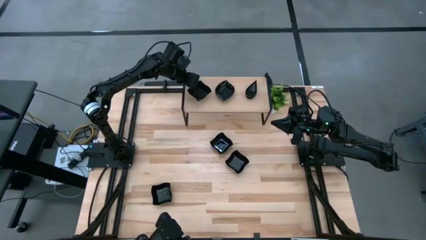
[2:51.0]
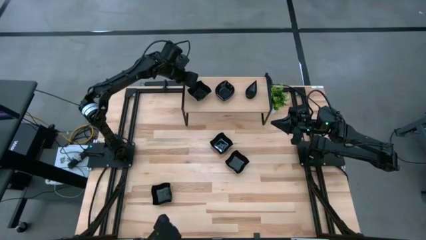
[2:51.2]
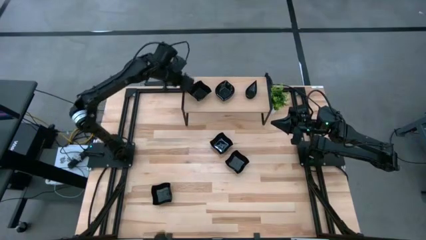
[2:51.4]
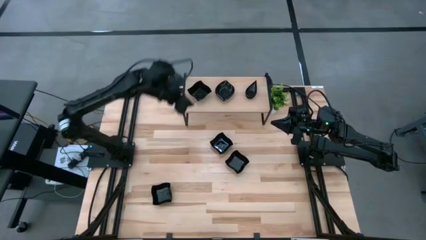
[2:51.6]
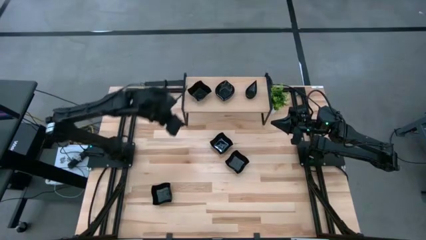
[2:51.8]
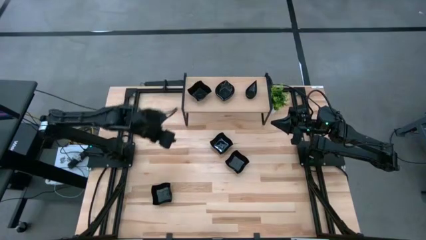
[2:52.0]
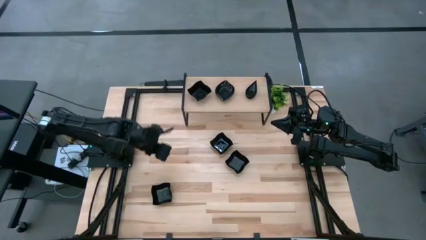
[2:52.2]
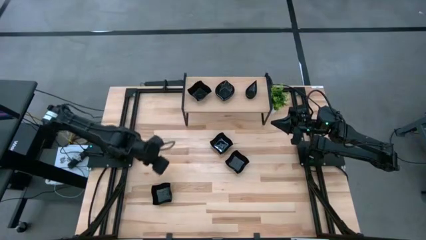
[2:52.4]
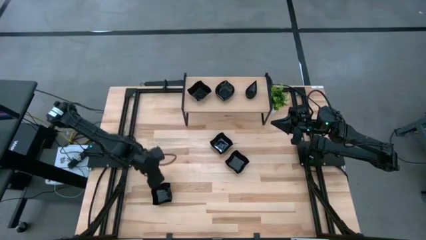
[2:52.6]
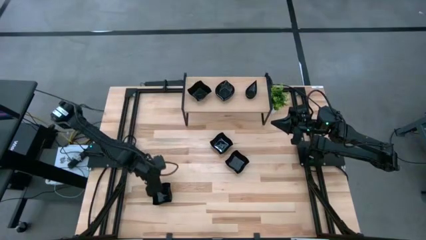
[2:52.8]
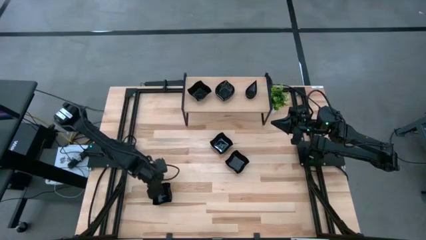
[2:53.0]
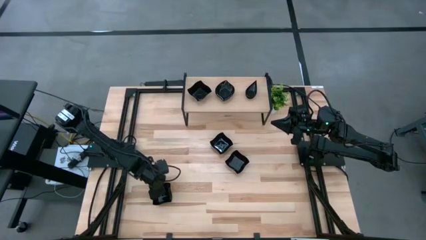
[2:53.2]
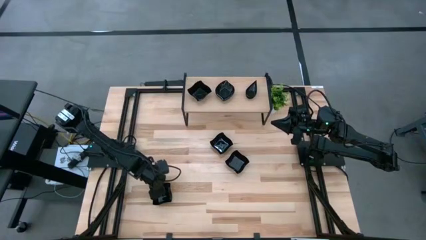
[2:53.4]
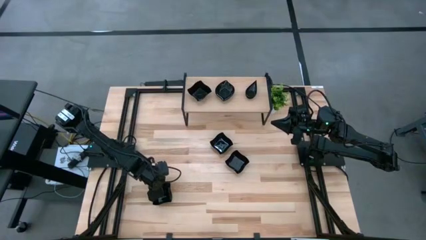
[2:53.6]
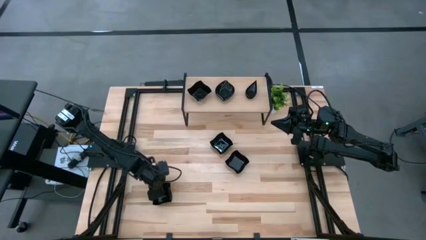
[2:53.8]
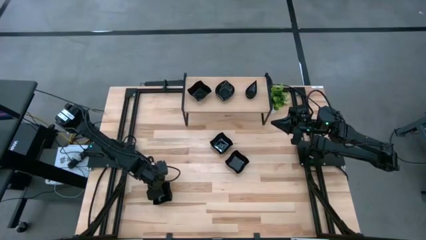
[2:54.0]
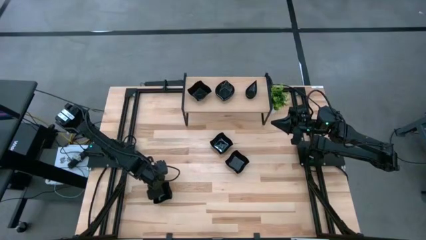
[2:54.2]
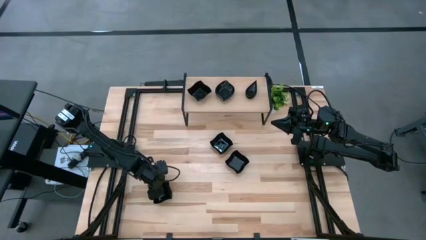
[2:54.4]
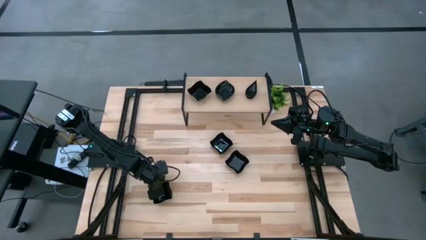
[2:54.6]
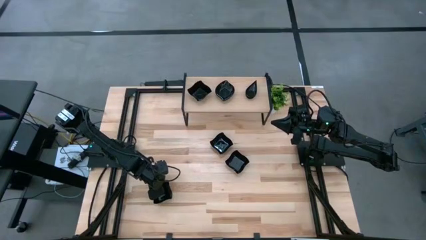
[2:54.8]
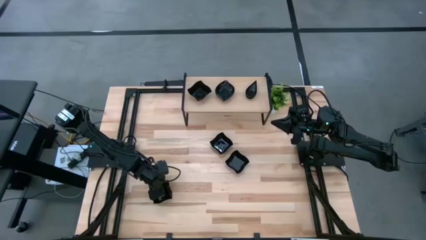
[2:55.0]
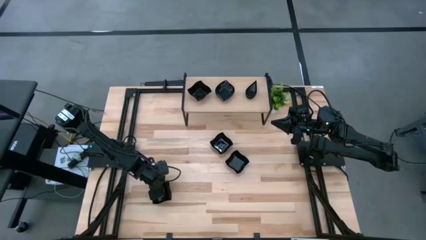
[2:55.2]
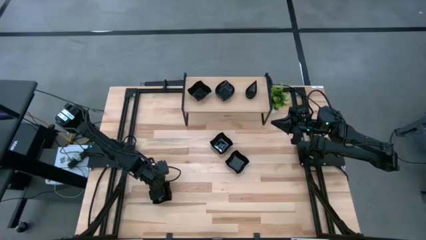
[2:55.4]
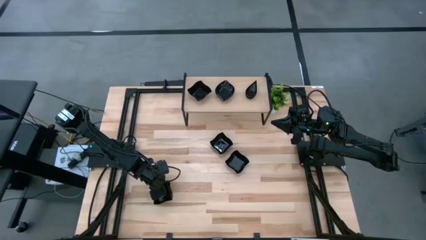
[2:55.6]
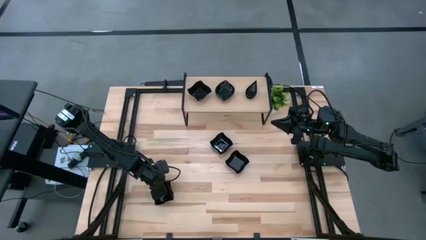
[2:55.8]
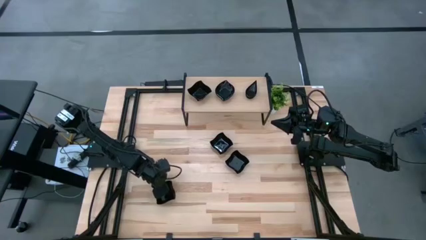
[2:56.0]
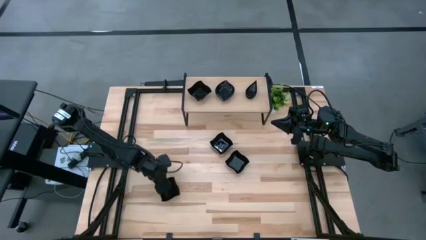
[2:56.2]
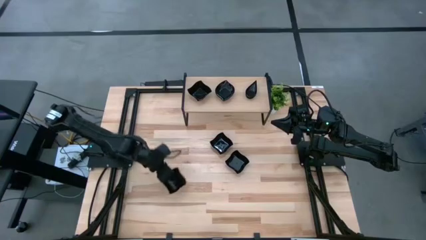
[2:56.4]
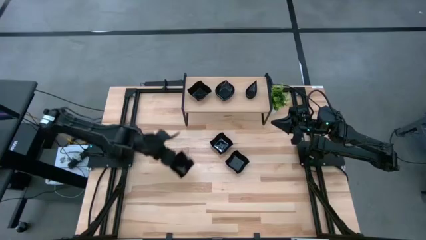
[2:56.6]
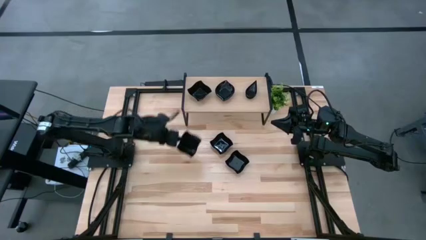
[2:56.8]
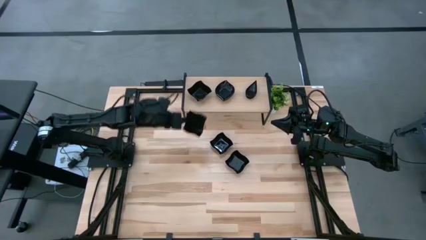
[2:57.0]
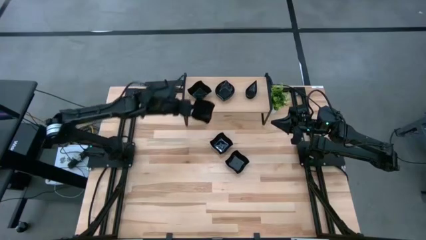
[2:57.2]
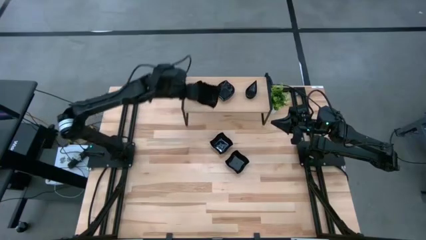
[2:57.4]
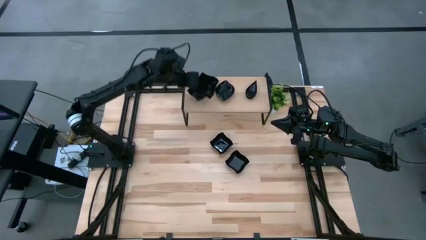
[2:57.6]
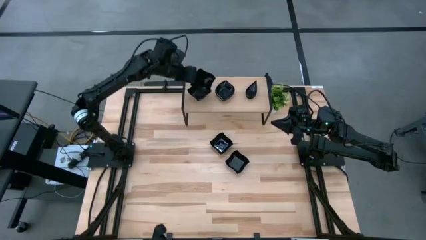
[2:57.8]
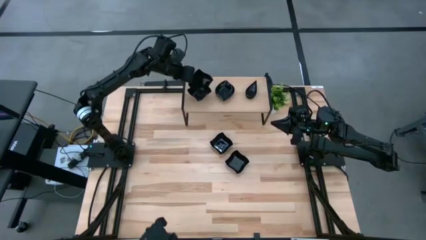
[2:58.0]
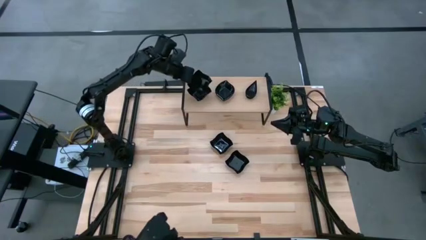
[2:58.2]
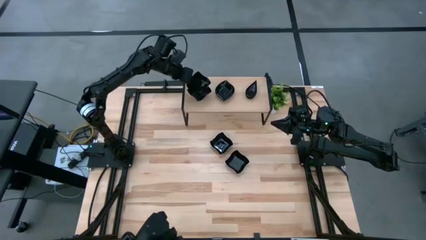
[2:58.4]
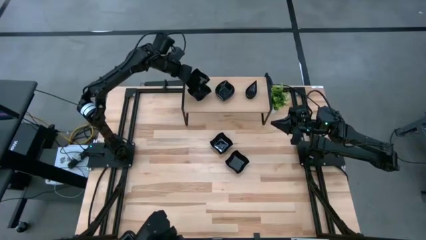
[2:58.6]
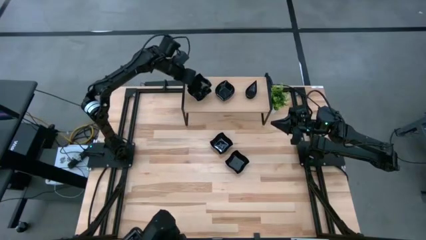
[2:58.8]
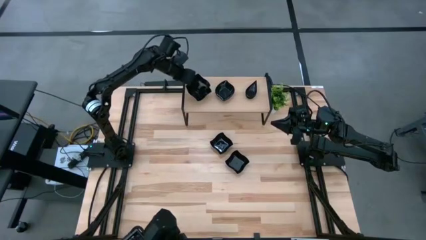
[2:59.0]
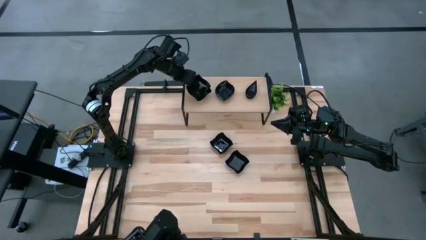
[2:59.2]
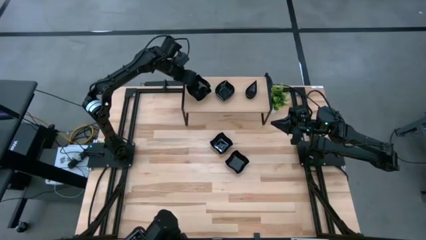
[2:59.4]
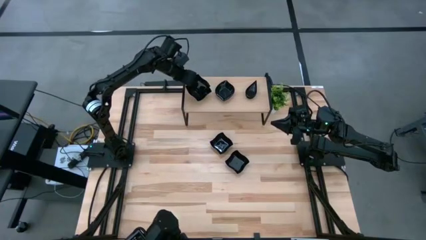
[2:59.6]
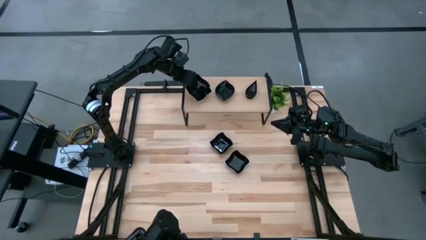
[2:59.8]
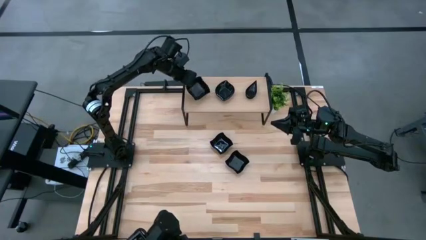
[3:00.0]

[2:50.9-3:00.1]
Task: Pick & Place Mini shaped plates
Stack the bottom black distorted square plate on top of the other black distorted square plates on the shelf

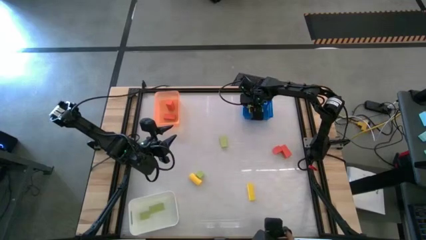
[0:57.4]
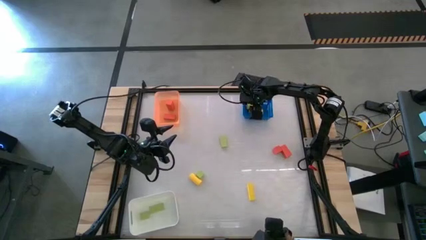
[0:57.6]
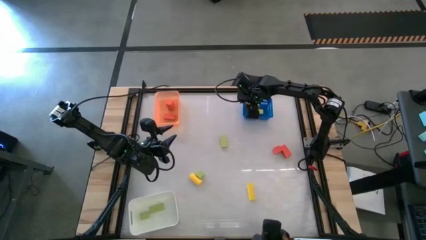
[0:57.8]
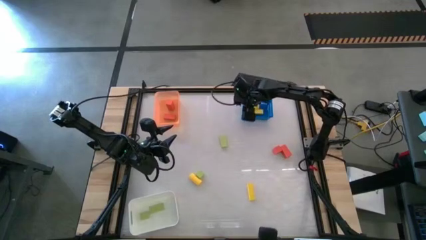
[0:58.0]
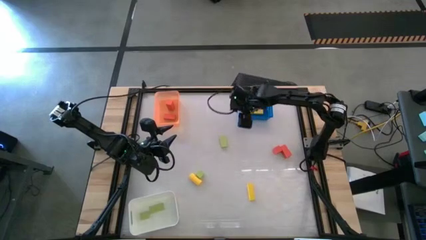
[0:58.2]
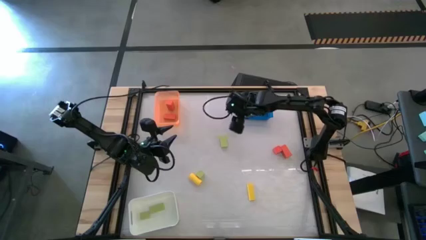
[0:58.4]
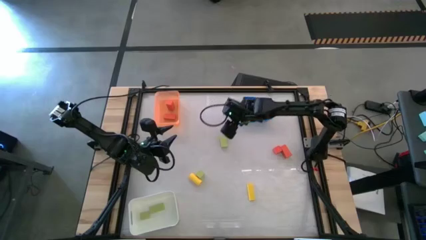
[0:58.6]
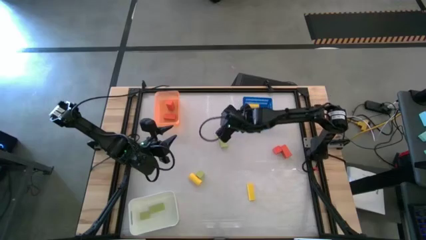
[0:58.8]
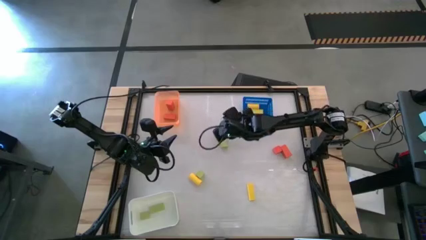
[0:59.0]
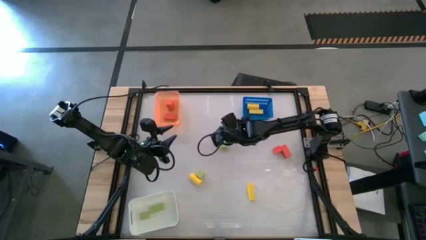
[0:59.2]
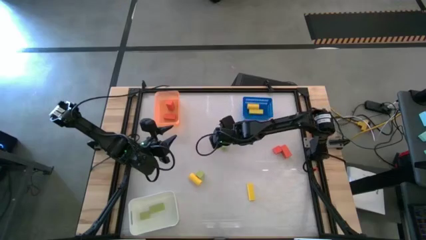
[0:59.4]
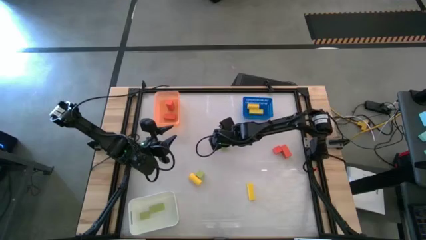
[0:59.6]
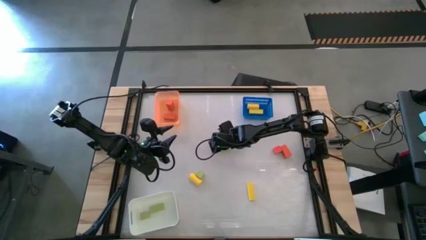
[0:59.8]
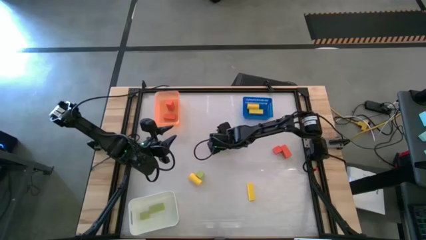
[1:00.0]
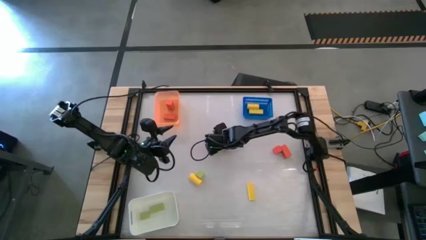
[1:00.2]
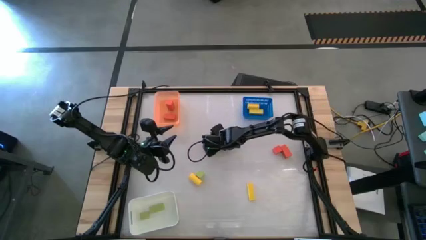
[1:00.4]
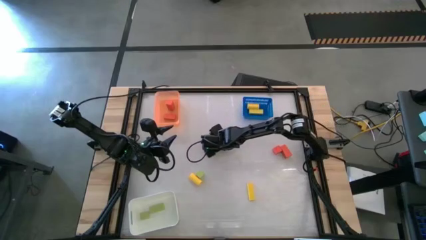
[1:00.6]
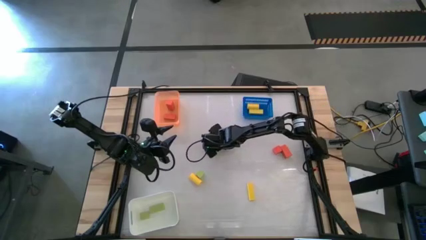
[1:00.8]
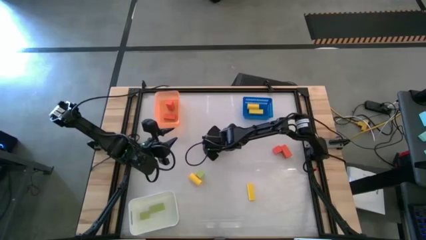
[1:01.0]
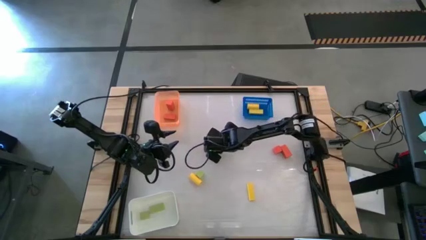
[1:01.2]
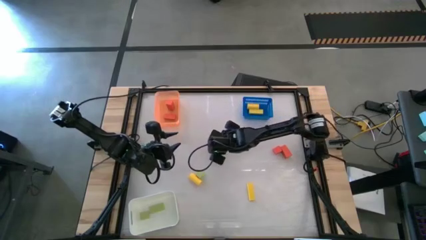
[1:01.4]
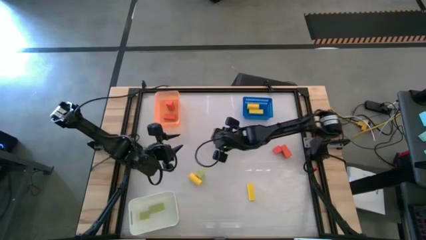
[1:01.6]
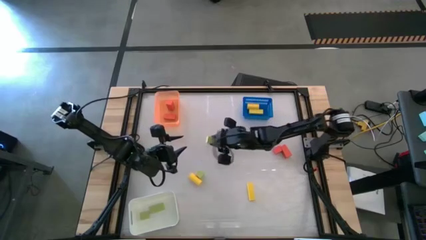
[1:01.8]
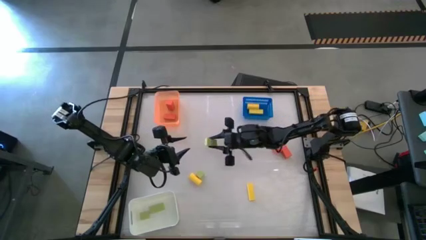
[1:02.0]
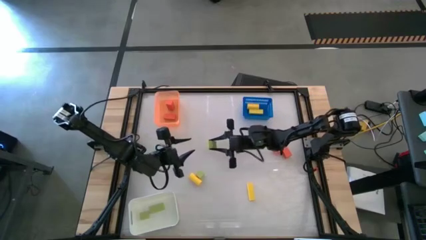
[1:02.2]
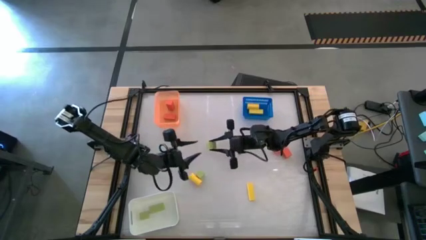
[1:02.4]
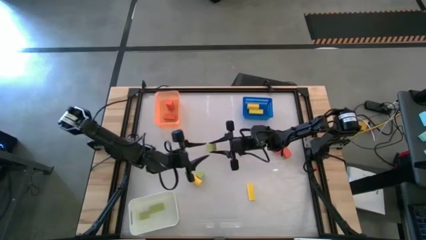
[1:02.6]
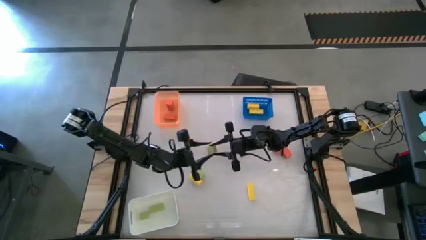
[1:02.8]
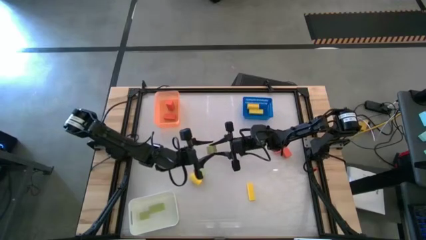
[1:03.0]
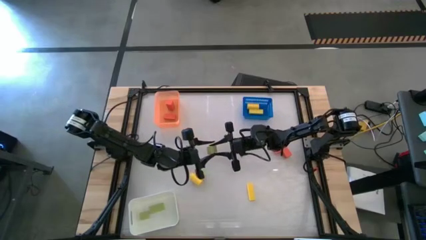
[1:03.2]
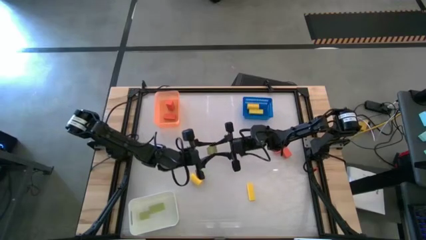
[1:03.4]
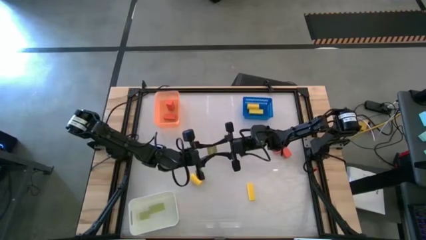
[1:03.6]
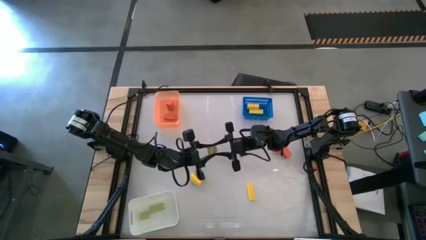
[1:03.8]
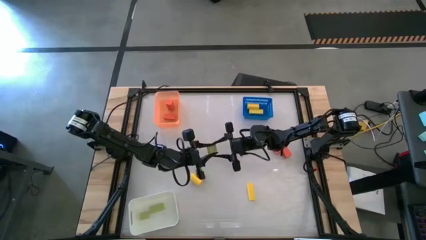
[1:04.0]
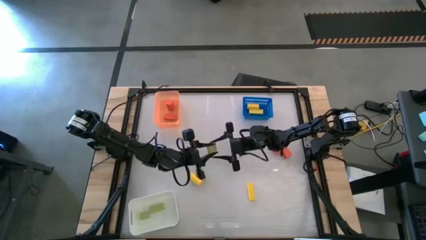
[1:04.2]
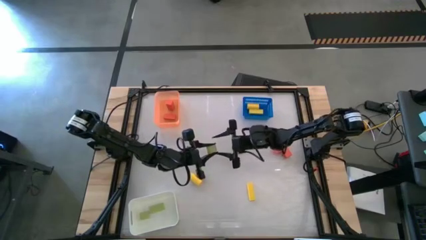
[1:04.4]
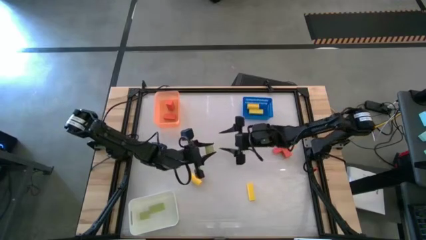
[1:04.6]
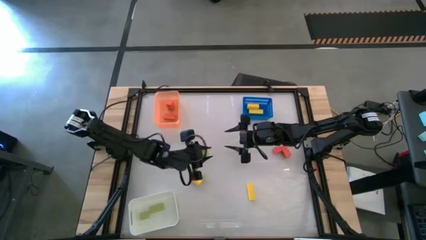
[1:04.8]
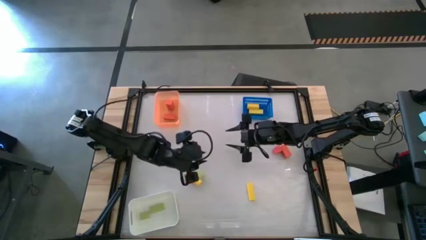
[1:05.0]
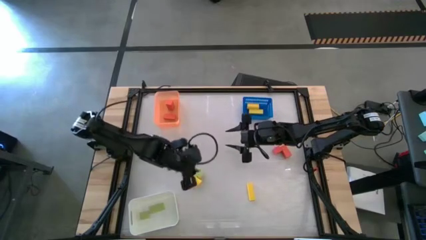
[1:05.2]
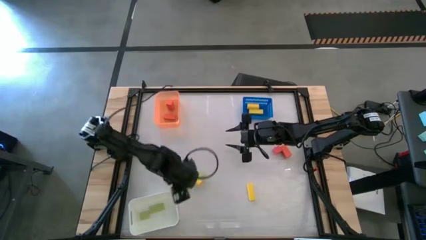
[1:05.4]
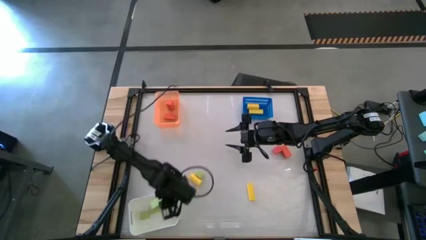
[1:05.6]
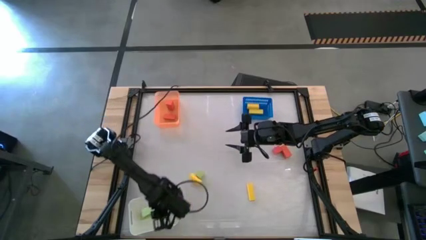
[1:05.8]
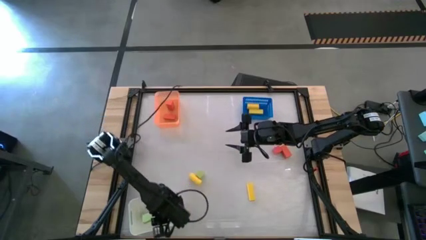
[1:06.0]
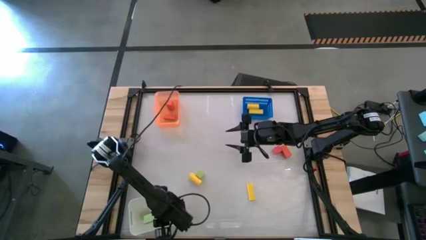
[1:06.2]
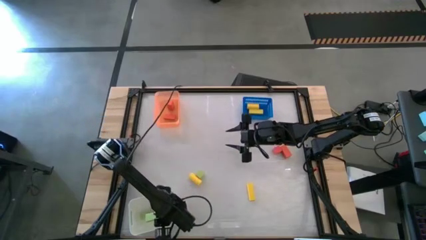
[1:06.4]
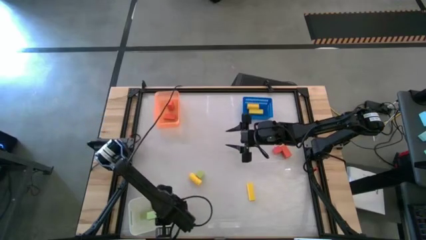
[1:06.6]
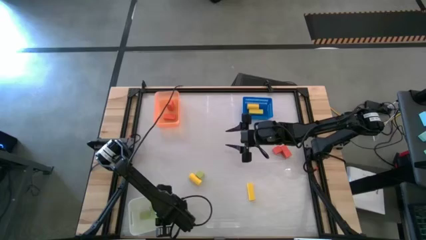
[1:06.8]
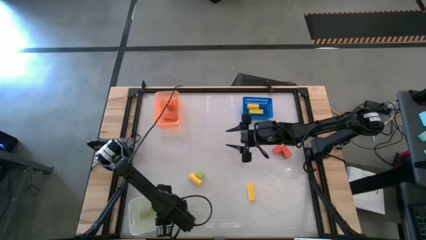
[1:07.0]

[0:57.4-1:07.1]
Task: Sort & place blocks by color
Put the green wooden block into the white bin
